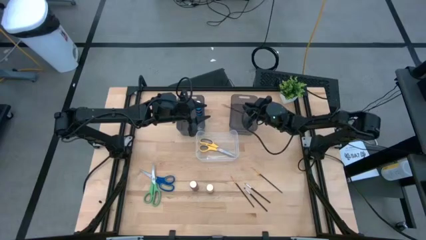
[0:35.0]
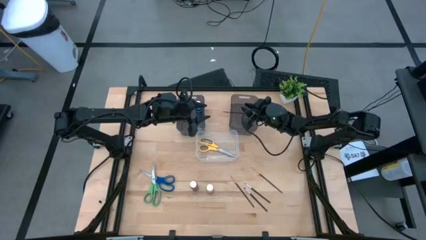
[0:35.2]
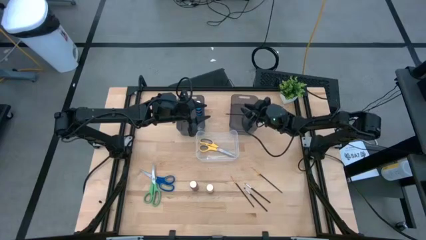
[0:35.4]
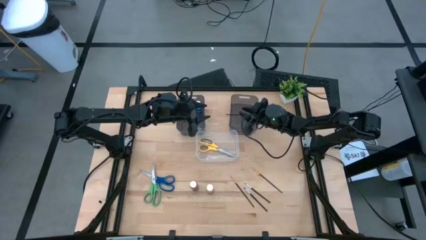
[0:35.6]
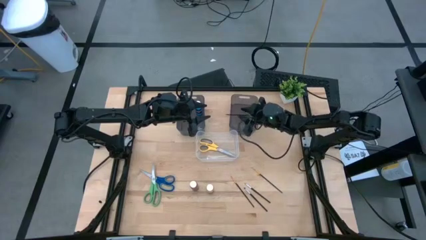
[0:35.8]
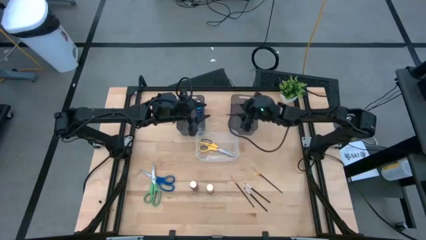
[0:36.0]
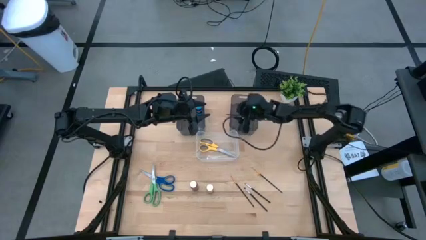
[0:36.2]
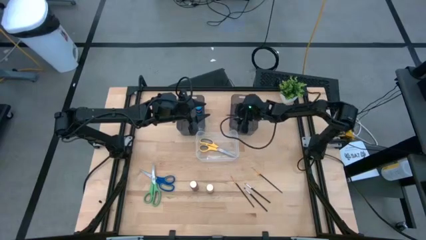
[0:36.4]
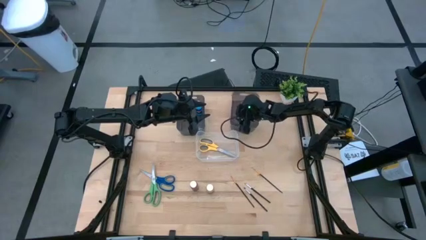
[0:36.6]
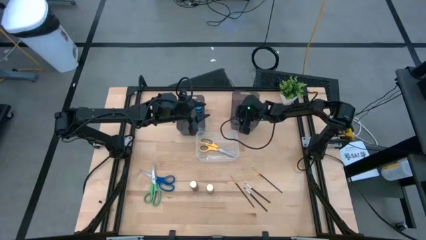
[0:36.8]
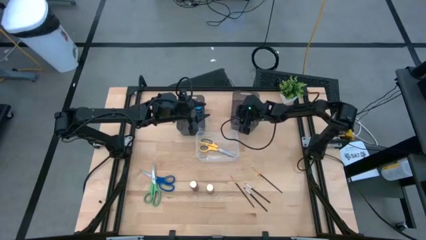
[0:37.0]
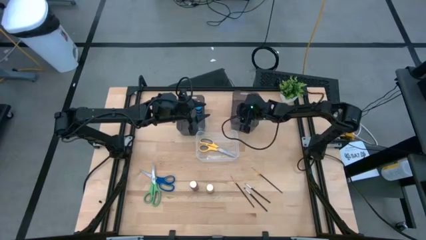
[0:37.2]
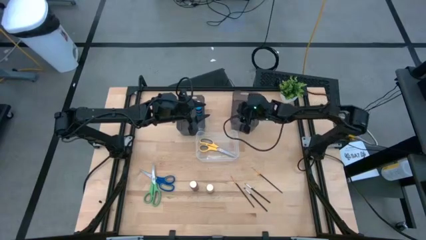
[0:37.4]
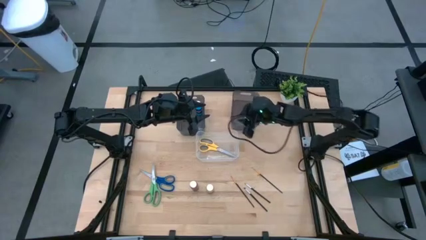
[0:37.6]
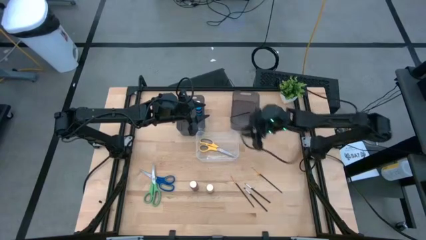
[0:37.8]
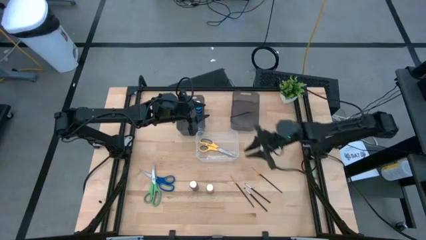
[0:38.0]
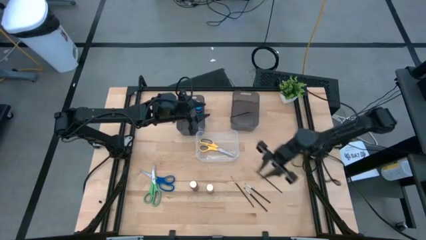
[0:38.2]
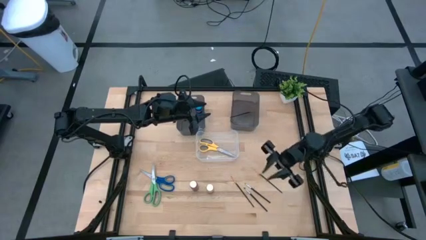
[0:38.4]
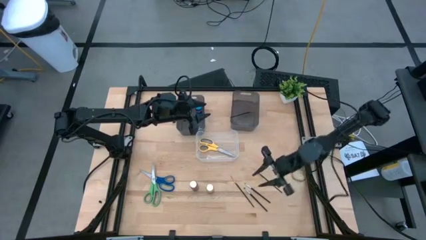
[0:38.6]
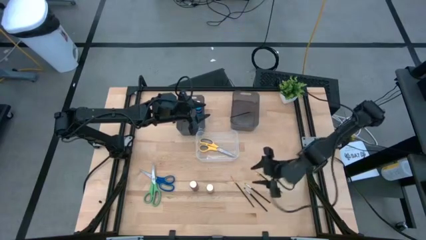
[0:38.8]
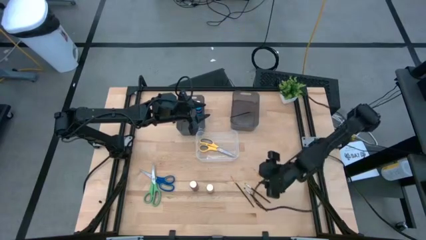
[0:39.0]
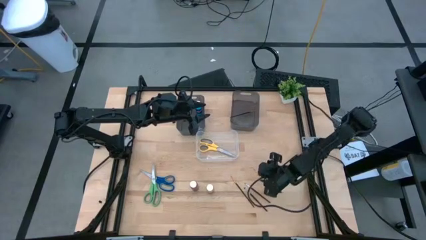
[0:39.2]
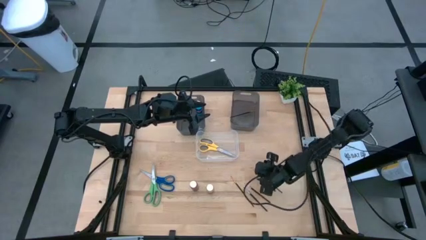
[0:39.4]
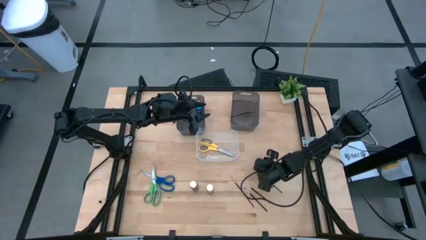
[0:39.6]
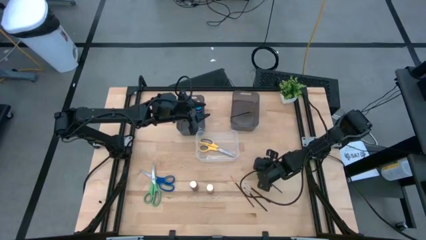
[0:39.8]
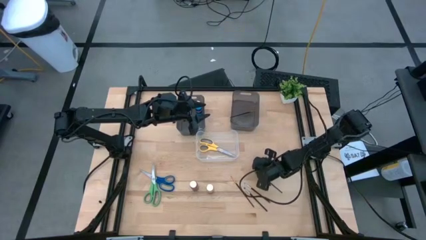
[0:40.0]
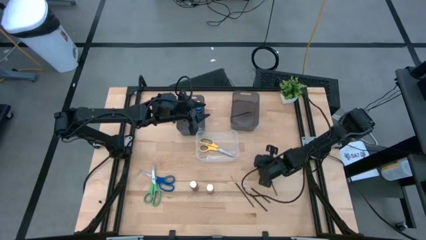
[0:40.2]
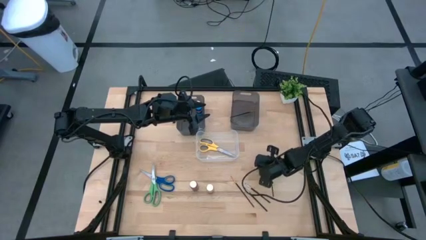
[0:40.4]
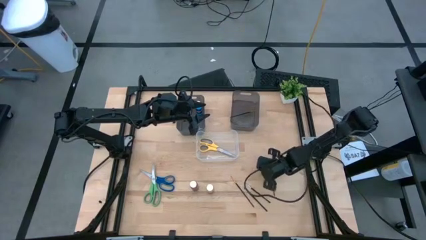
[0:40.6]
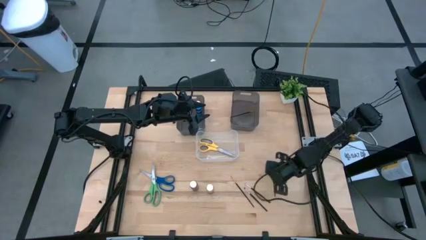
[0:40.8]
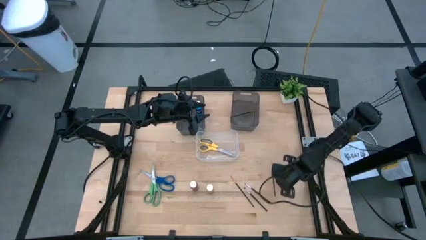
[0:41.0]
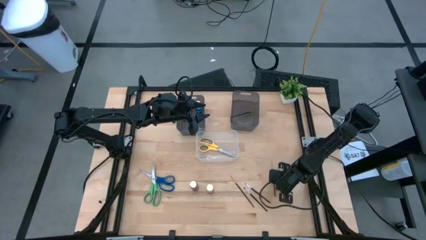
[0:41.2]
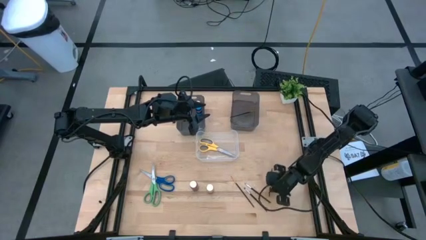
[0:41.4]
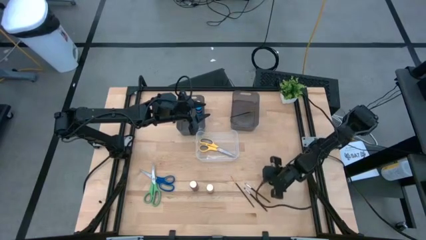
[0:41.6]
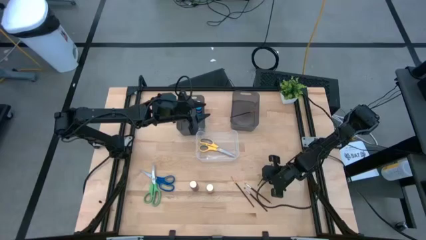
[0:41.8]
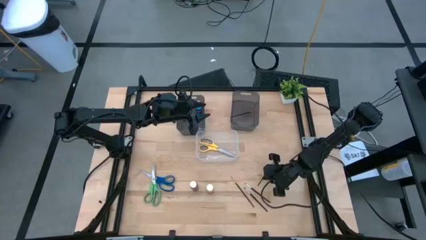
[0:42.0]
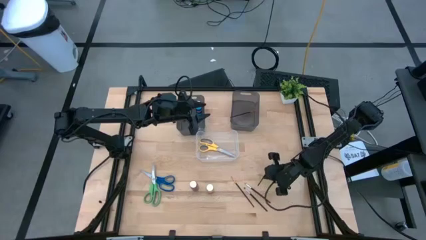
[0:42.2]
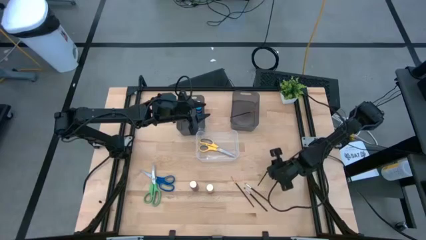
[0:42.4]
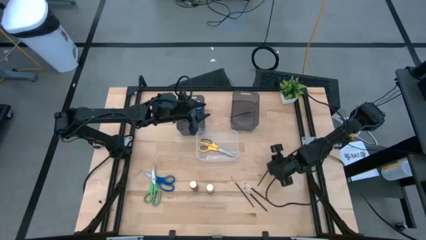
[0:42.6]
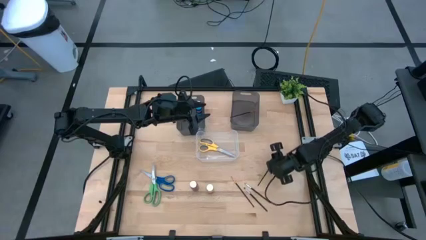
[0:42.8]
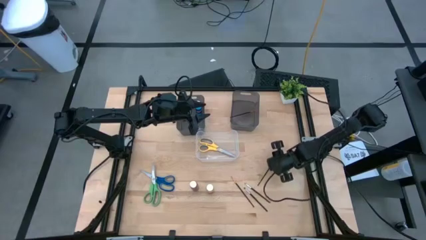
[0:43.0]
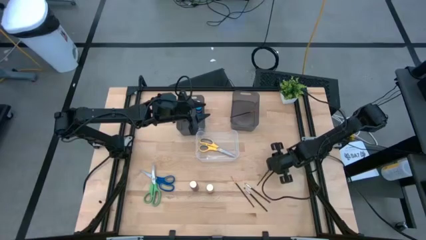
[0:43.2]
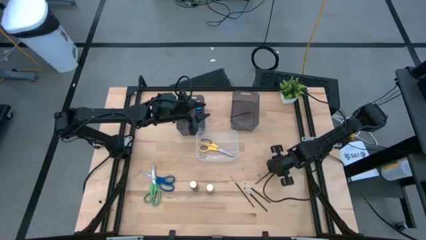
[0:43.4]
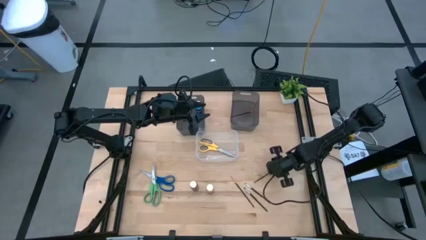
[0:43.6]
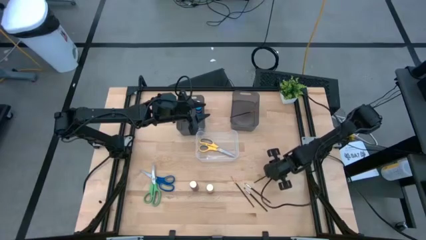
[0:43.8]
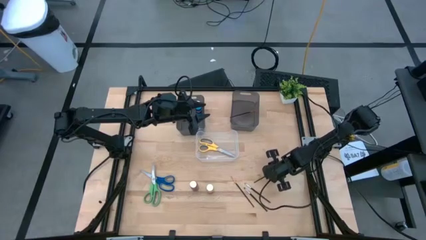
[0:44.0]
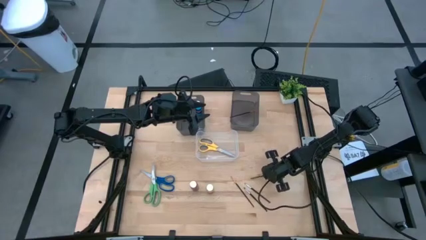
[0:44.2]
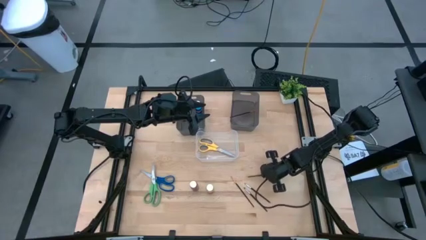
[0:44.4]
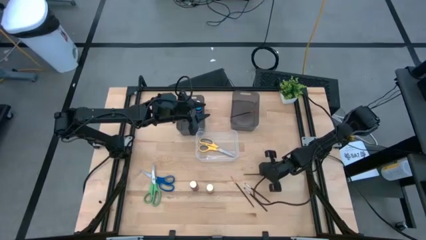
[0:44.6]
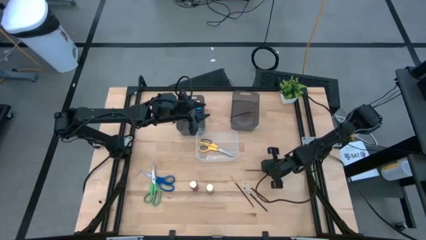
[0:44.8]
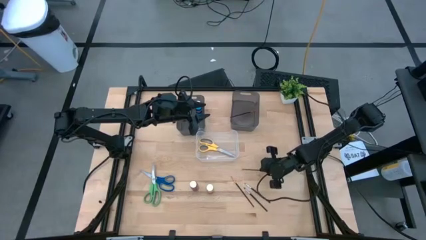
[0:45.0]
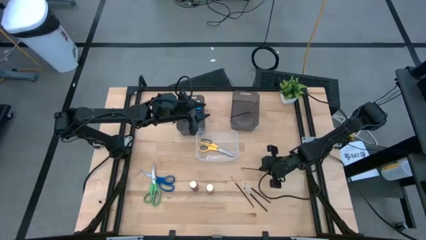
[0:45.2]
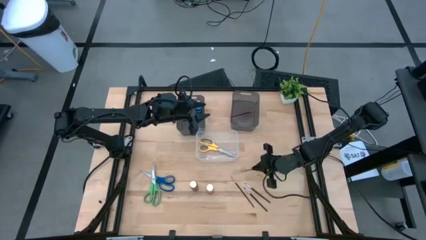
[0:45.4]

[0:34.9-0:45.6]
Task: Pick & Place Paint Supplies
Put the right black and gold brush into the right black bin

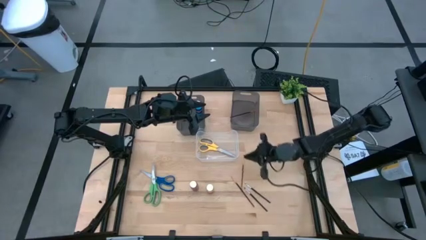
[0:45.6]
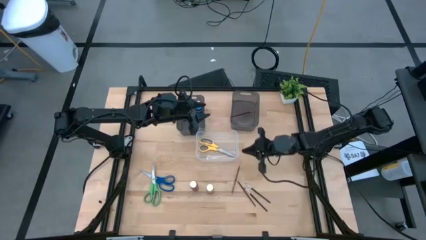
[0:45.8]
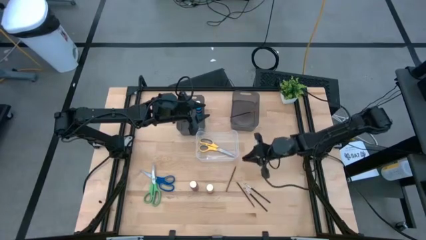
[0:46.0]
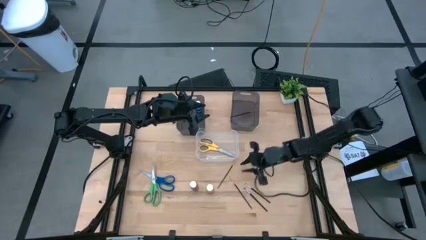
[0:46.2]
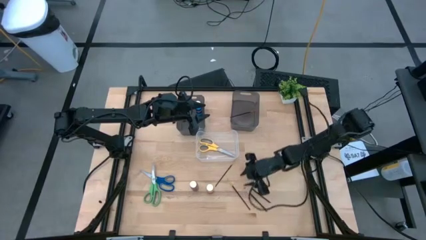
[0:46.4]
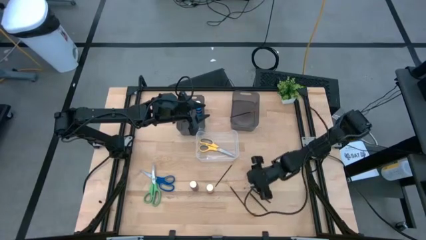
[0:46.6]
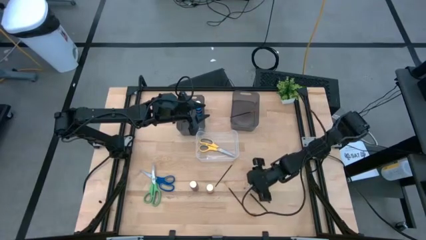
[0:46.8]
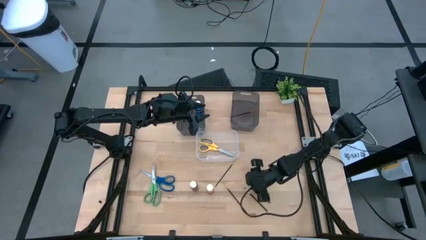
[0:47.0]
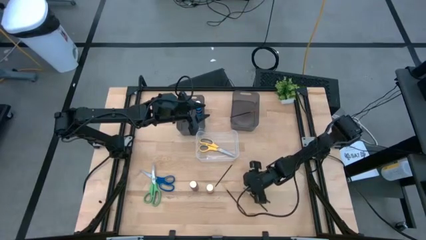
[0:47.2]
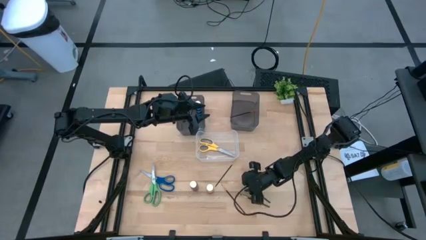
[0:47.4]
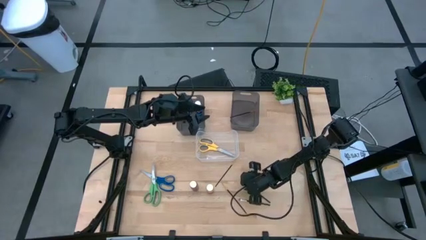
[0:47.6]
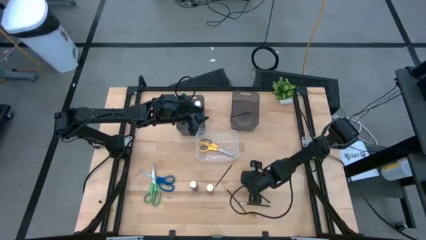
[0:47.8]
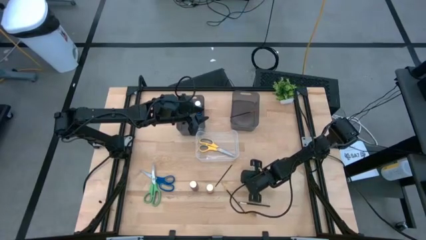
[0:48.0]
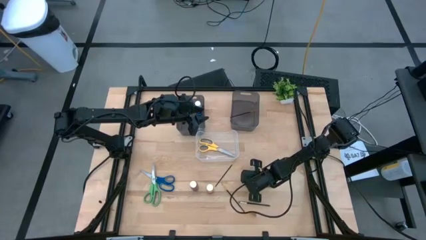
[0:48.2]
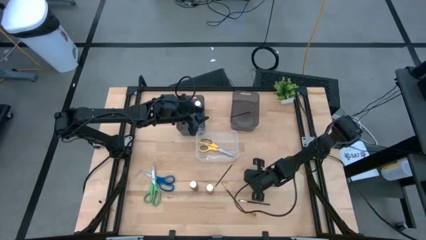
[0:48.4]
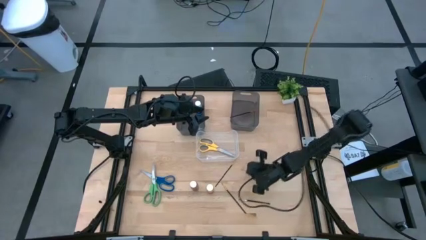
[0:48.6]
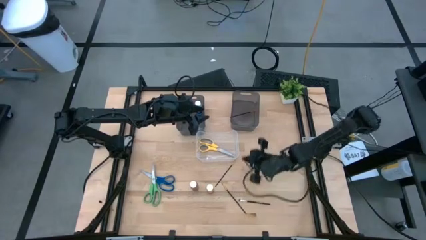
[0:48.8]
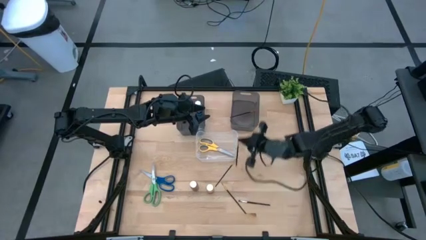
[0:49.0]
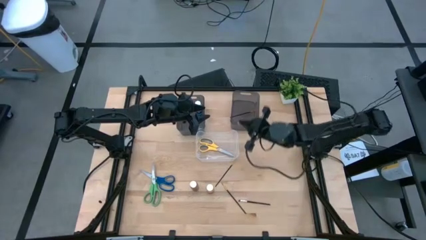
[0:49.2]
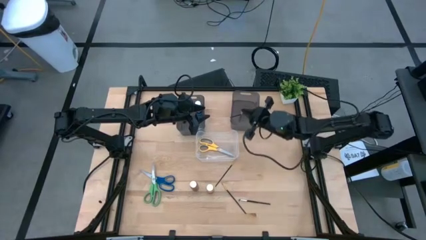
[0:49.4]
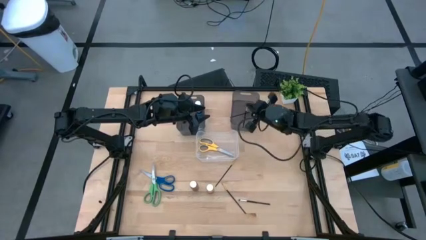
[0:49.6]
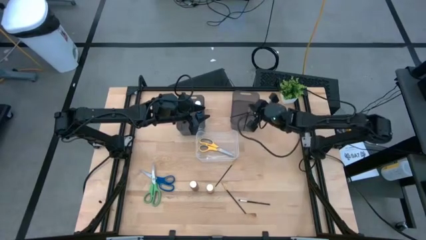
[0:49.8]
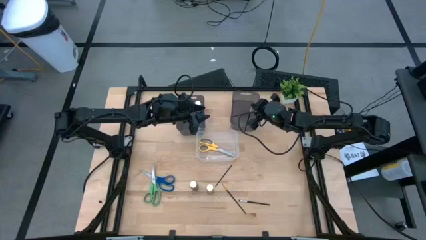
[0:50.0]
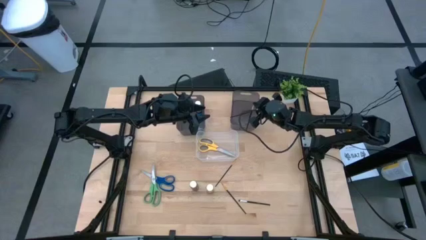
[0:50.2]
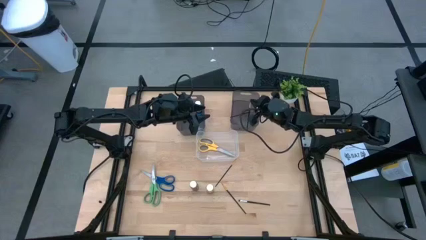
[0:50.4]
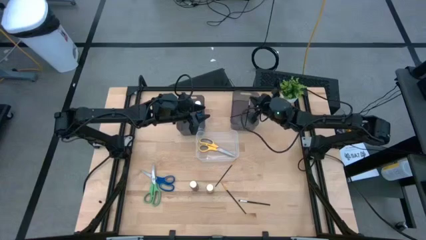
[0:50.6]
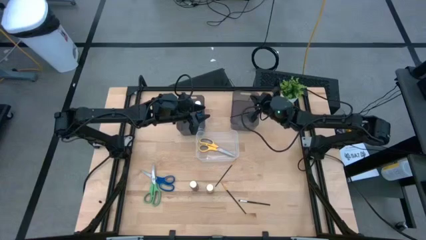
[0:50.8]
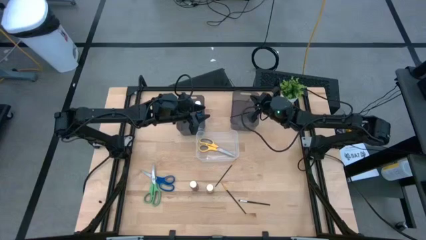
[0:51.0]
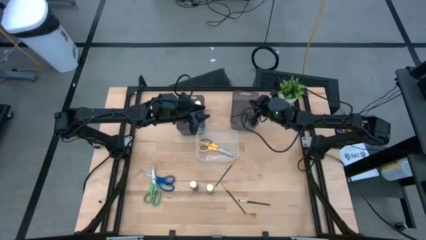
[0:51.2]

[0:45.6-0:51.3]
Put the right black and silver brush into the right black bin
